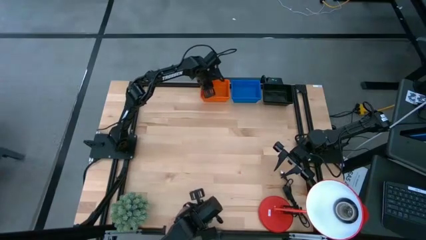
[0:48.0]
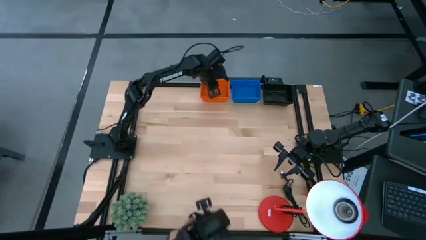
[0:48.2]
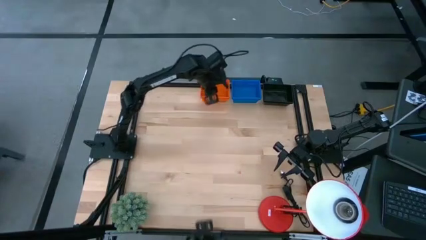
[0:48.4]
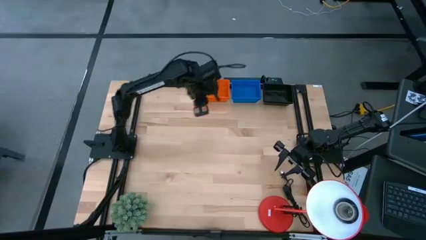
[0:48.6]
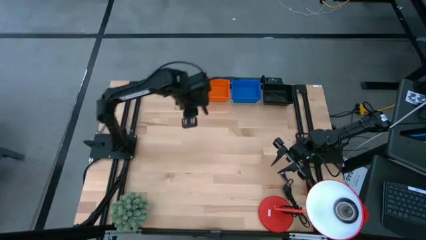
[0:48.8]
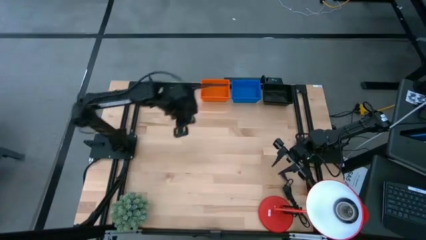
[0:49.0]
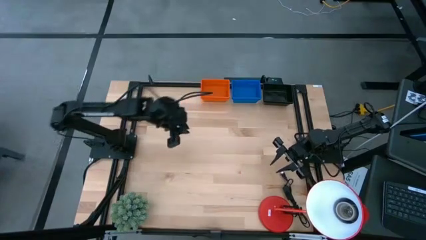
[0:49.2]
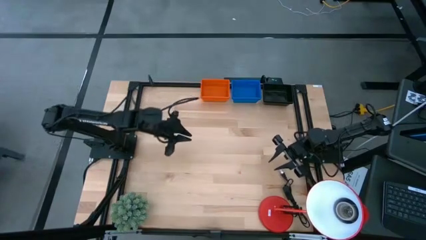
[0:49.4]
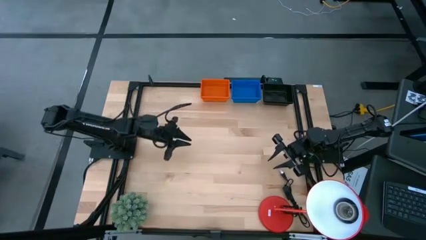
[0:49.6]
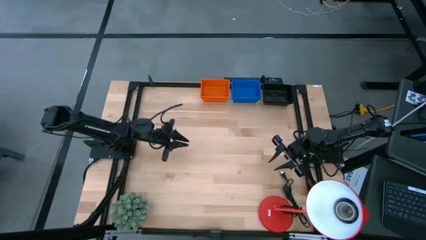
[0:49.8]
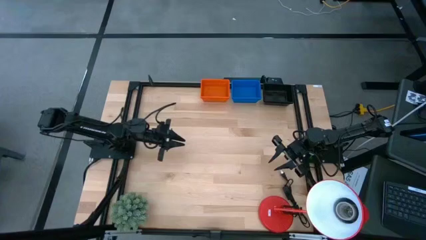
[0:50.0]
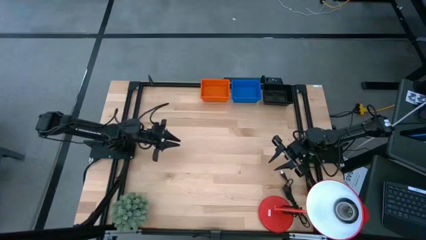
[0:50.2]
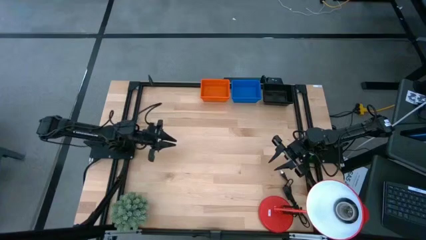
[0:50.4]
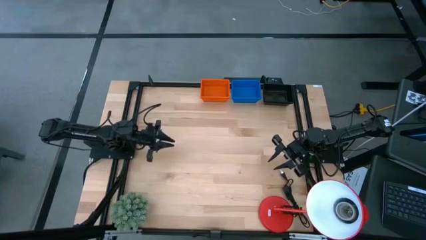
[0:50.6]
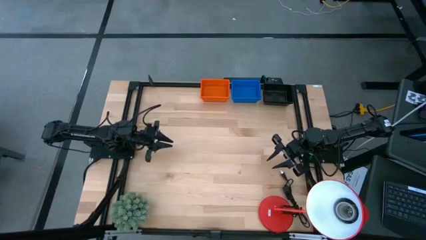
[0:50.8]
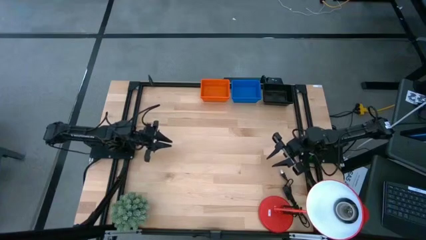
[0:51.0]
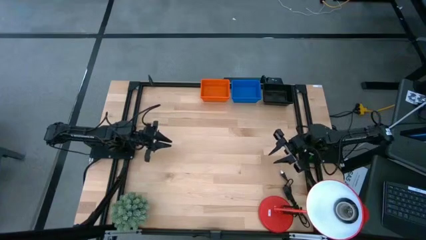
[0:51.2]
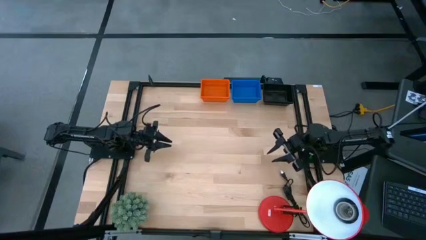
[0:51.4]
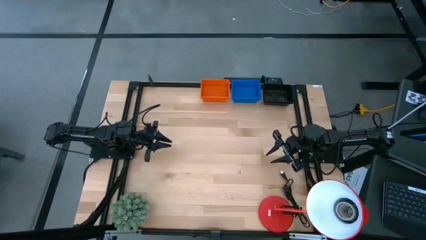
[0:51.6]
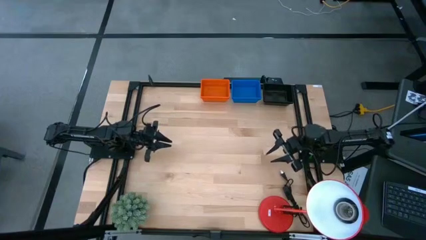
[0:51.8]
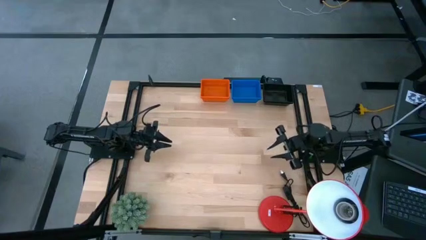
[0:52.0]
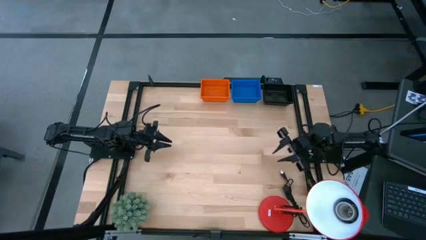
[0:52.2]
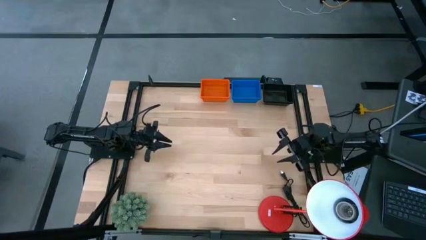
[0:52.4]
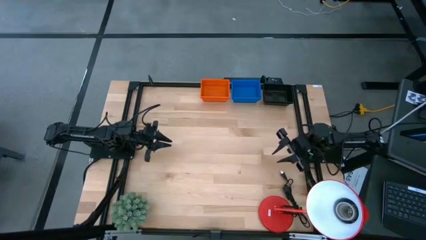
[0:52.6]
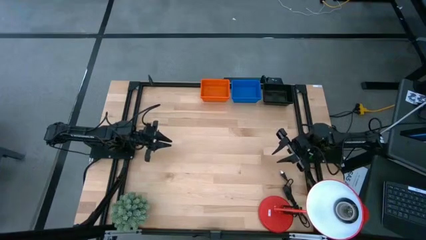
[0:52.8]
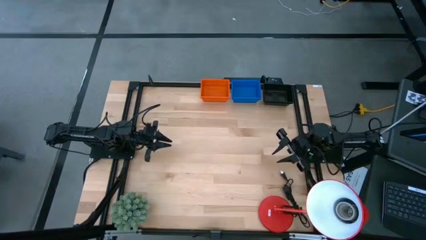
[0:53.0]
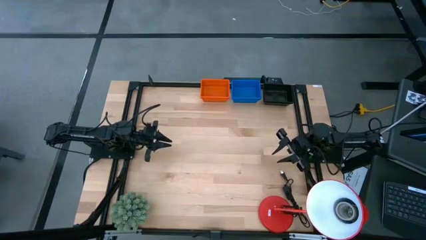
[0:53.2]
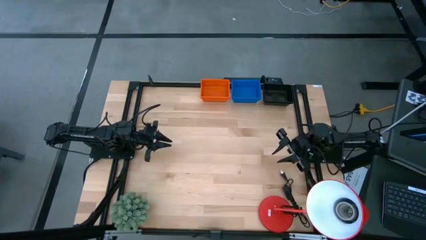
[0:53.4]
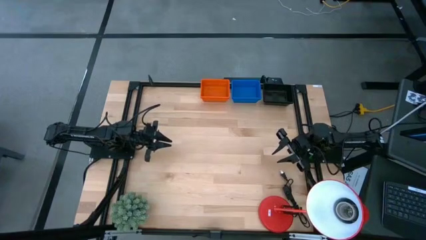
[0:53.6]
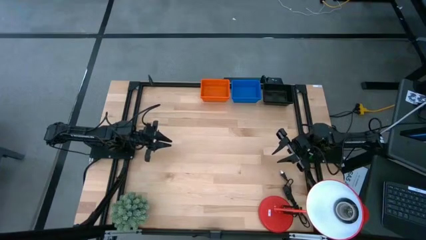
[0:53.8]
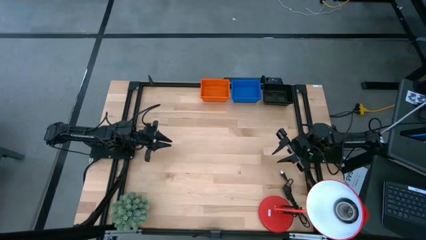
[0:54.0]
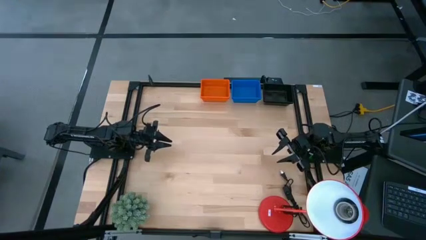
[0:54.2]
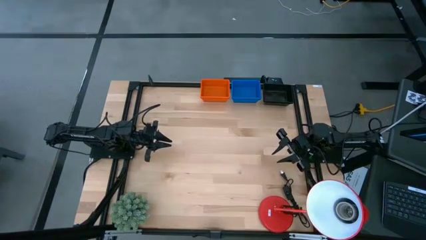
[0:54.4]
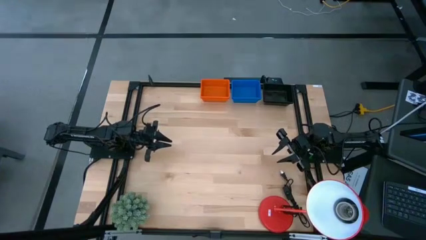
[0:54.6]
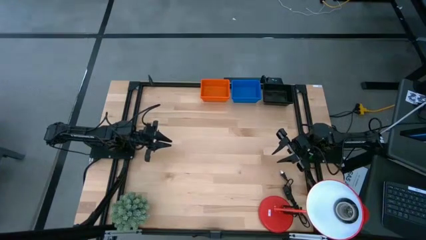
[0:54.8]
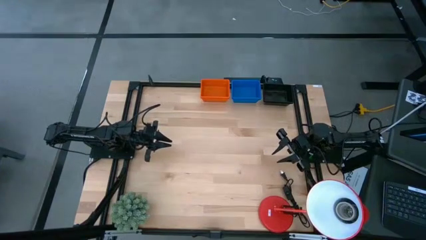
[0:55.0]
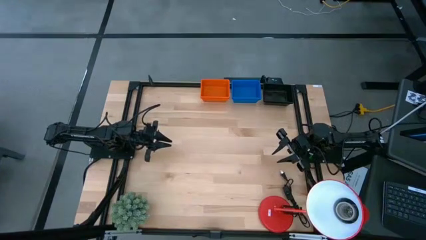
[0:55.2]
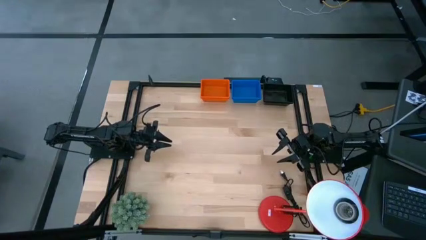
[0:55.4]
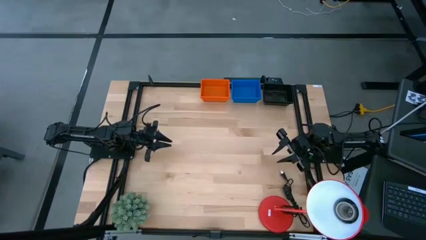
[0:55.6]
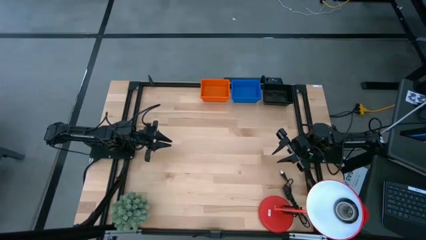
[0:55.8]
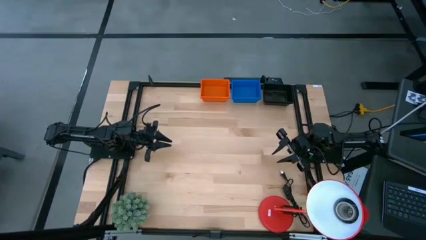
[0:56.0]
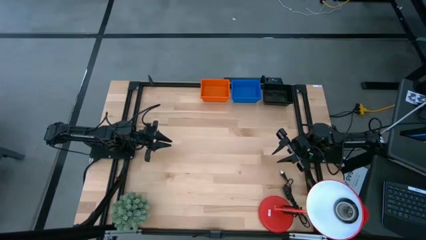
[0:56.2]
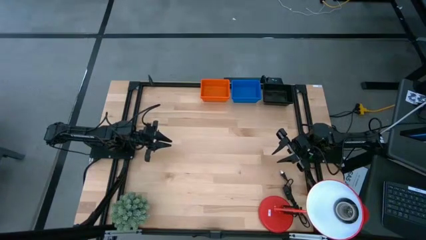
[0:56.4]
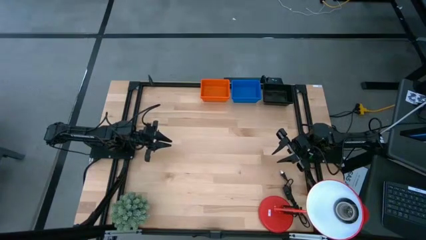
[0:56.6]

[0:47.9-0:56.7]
Return to Home Position

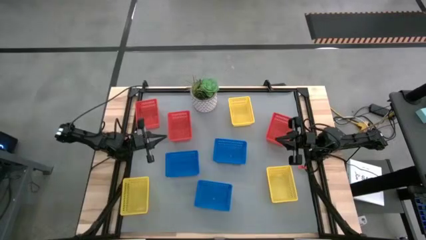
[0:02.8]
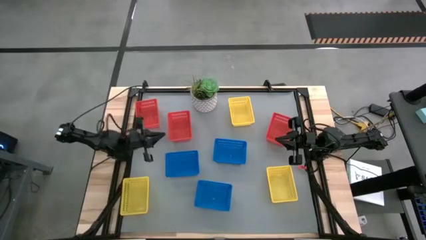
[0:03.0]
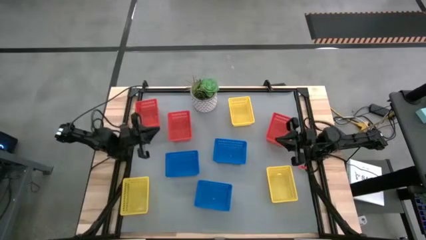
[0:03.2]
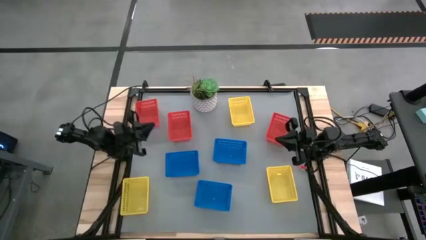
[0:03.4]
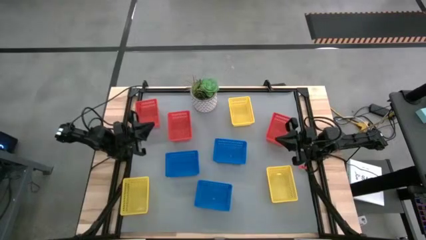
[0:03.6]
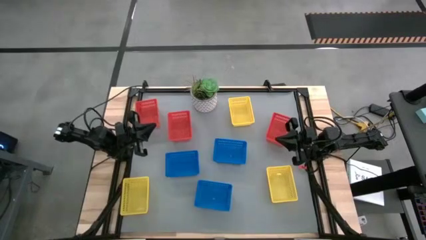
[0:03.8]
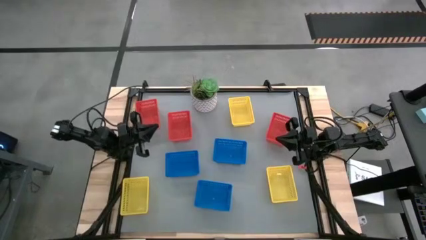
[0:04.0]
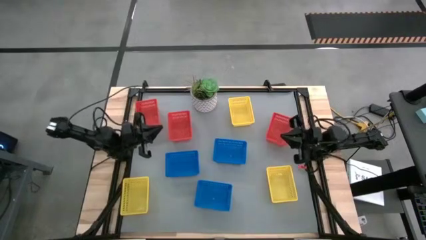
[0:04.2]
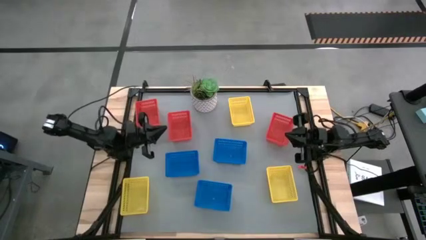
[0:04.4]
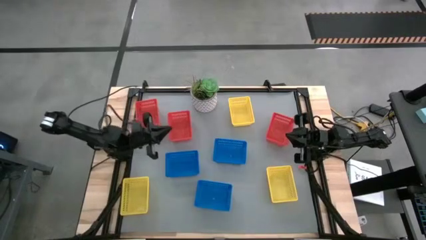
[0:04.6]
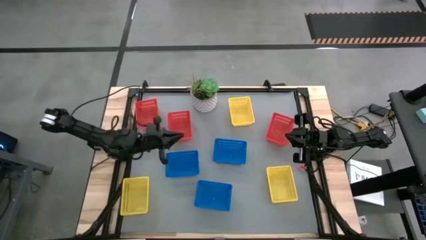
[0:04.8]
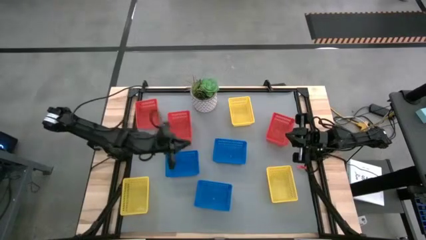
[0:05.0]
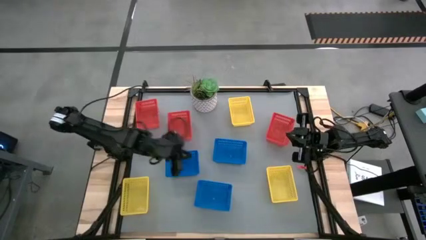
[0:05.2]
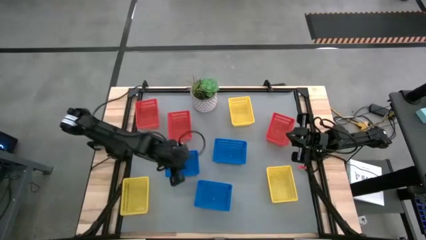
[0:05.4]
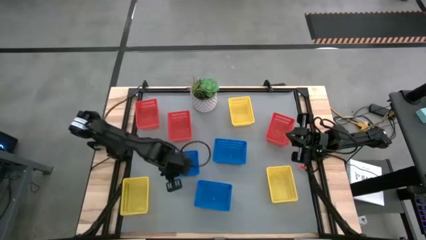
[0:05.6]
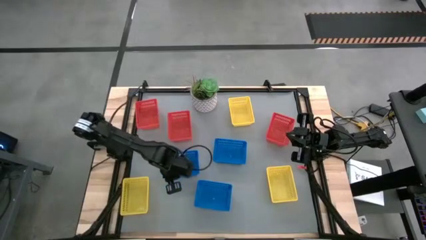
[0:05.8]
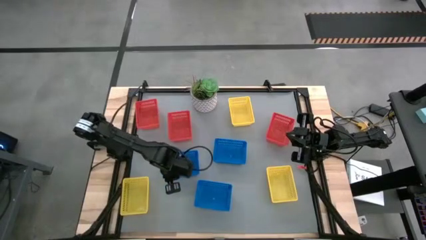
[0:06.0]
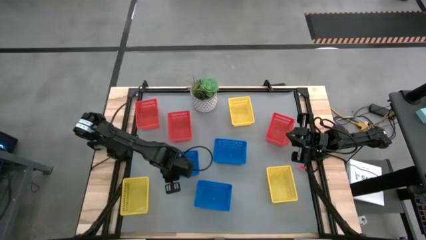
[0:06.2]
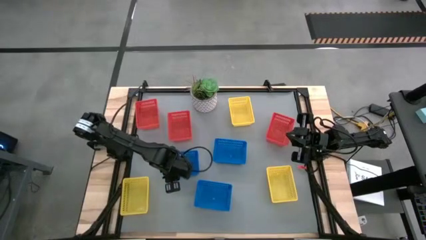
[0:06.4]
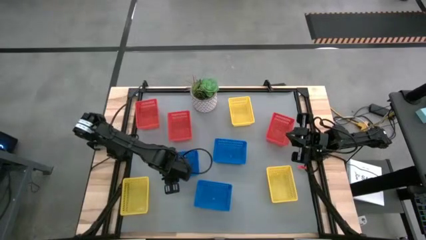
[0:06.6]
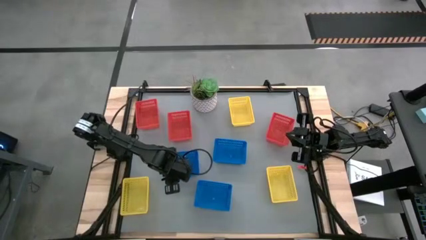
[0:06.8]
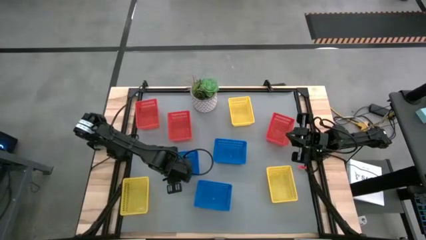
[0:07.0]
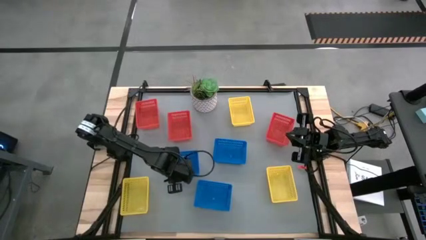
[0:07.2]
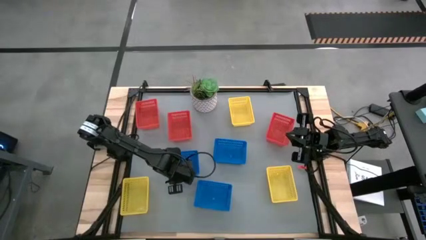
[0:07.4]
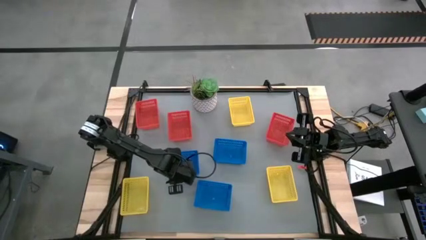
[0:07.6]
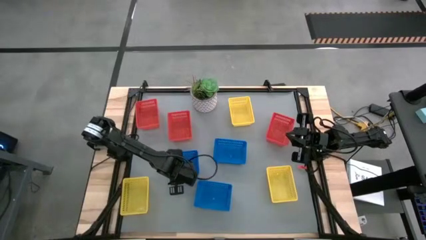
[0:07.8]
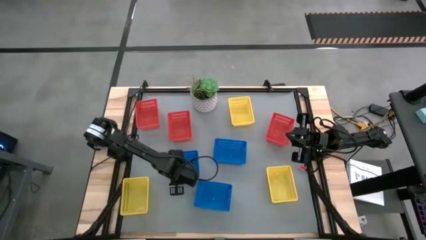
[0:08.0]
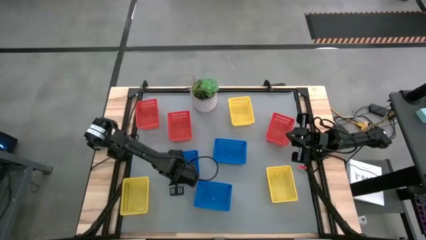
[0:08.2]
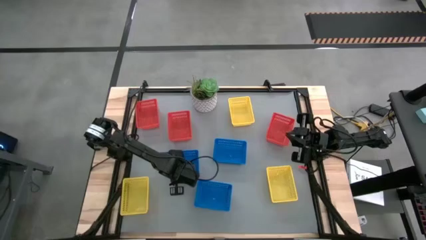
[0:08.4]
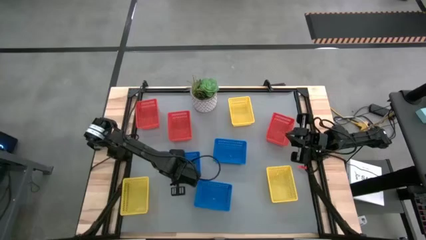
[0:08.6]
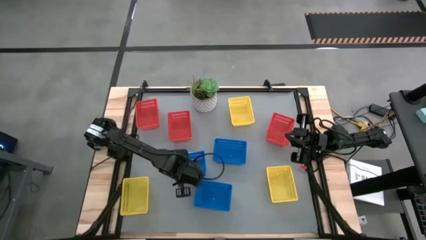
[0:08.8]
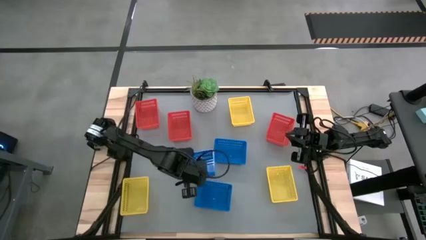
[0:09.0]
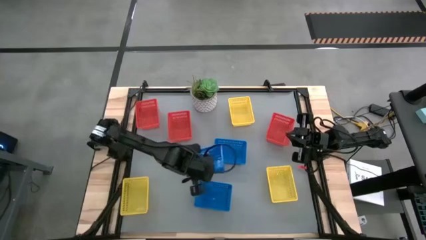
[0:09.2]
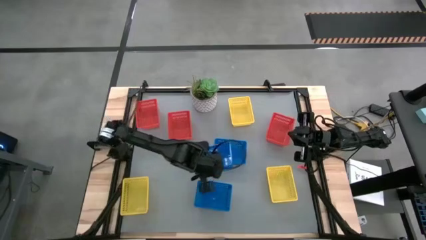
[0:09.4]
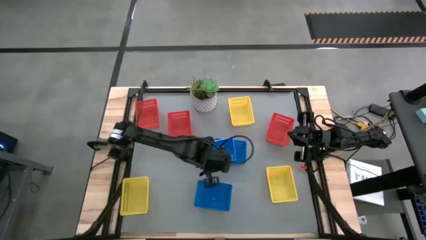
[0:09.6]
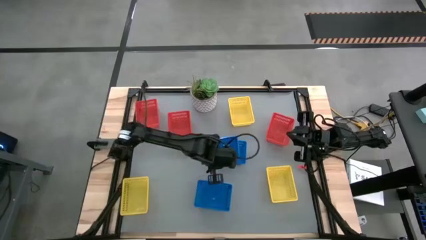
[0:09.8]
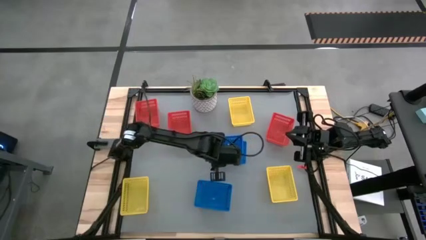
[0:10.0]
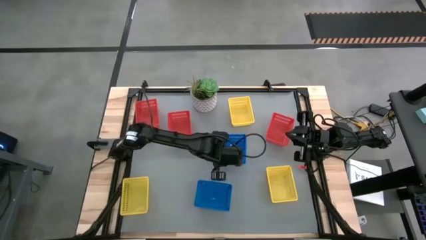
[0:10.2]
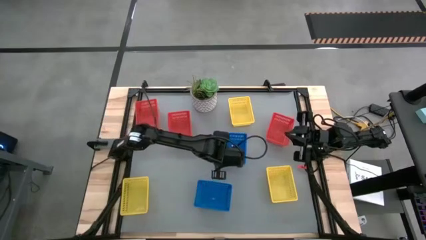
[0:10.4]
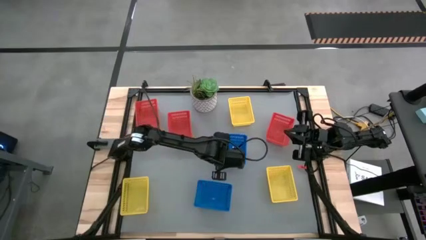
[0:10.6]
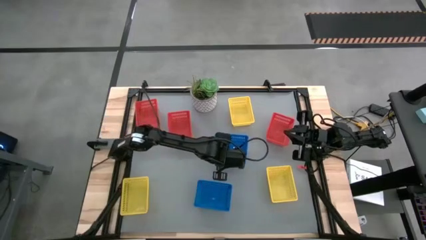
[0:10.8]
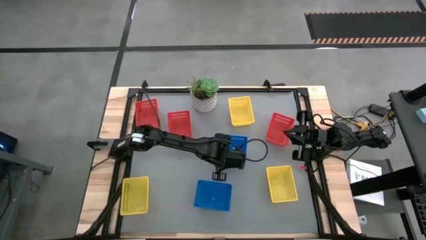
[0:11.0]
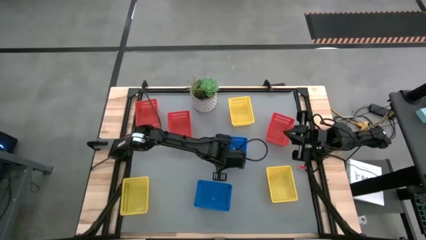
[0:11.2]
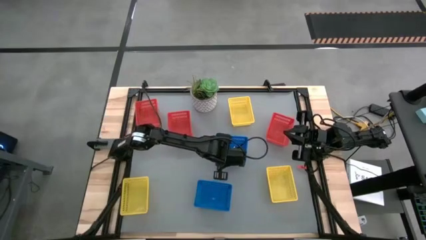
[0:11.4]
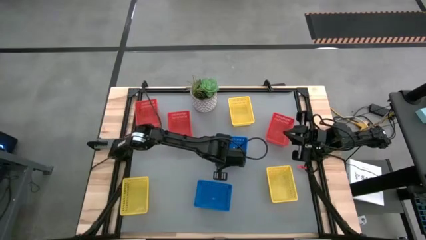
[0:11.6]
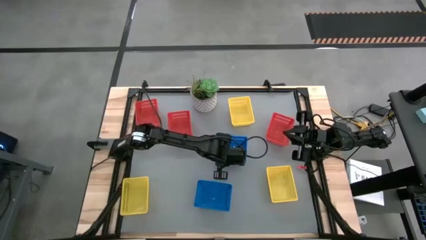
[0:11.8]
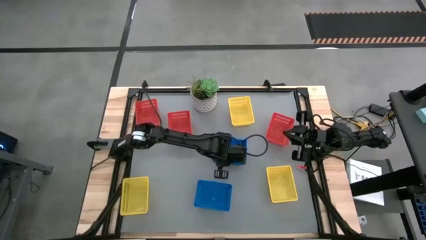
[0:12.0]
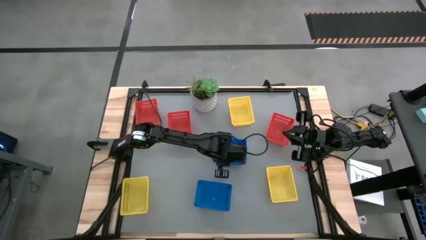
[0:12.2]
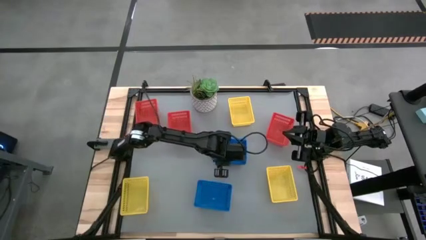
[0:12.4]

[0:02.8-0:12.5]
Stack the middle blue basket on the top blue basket
